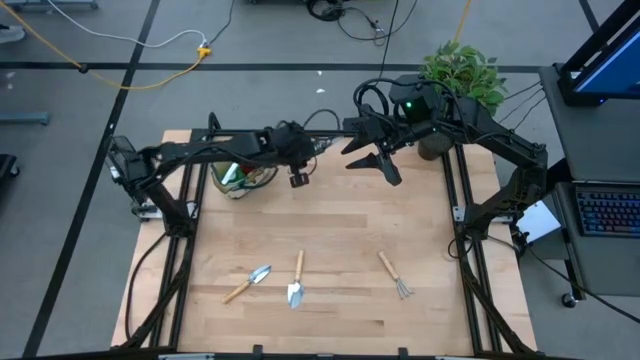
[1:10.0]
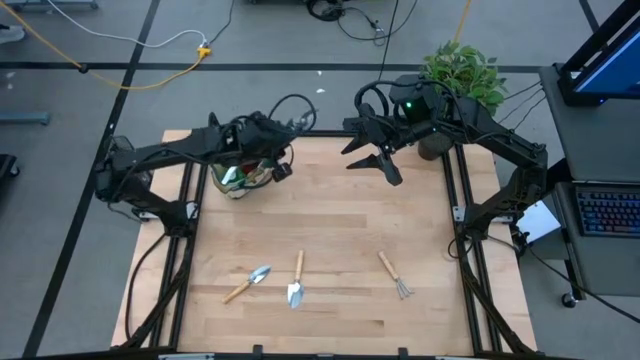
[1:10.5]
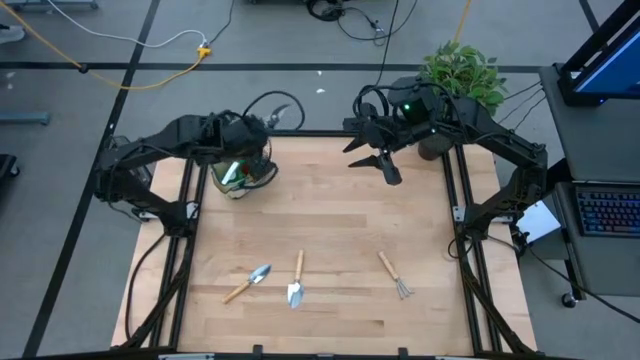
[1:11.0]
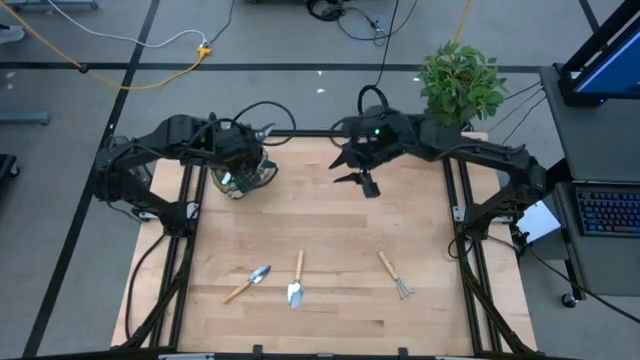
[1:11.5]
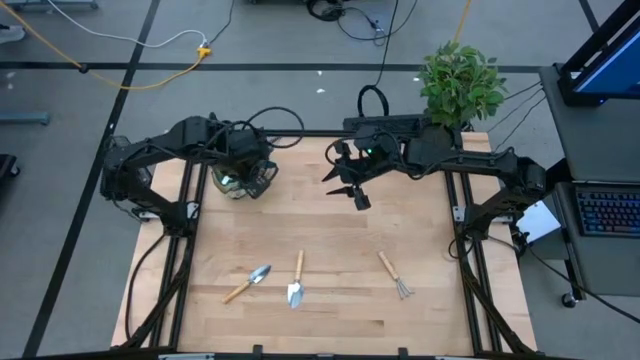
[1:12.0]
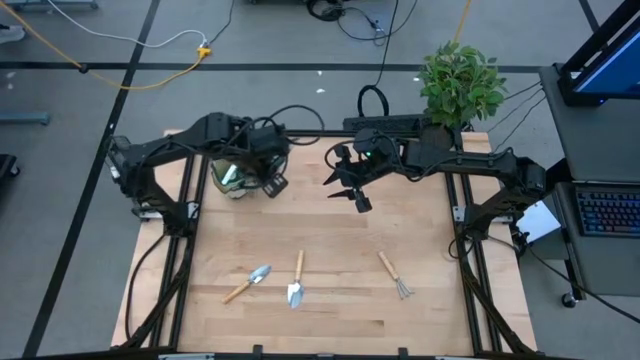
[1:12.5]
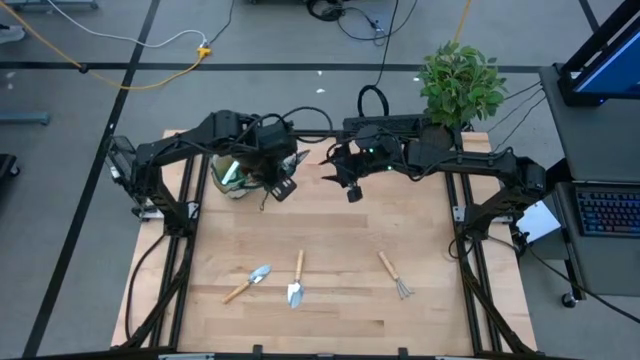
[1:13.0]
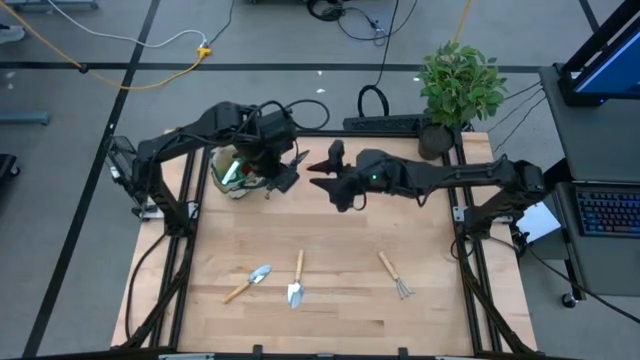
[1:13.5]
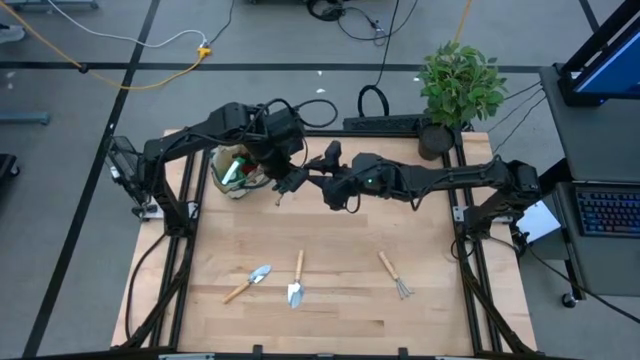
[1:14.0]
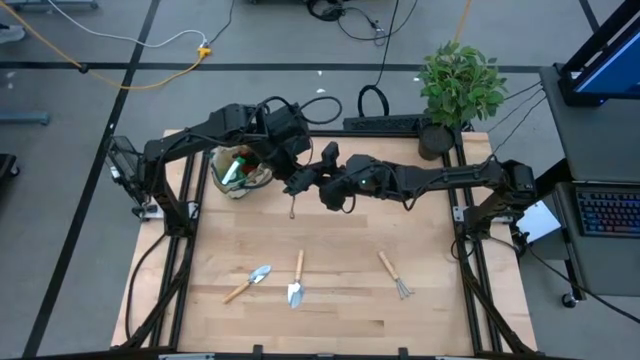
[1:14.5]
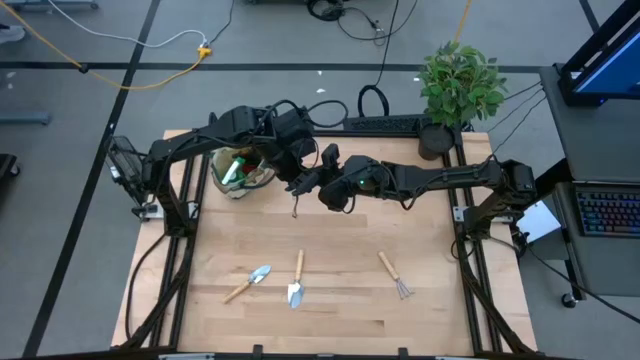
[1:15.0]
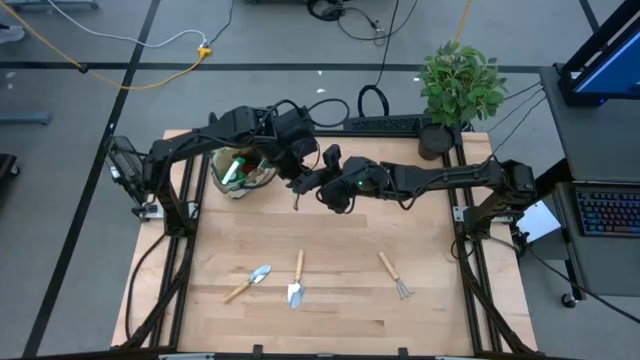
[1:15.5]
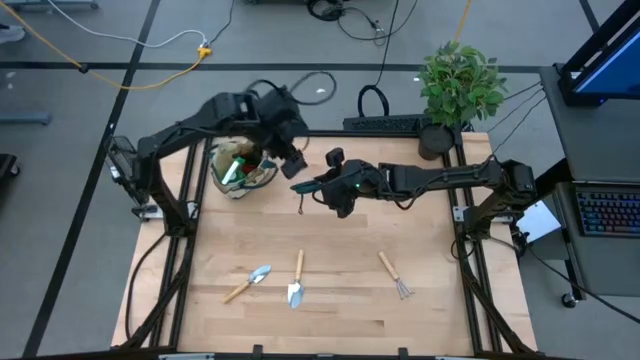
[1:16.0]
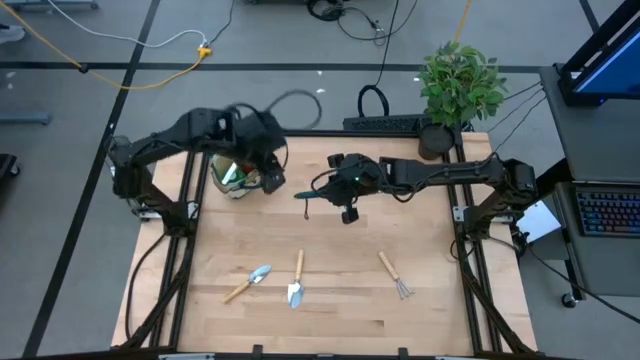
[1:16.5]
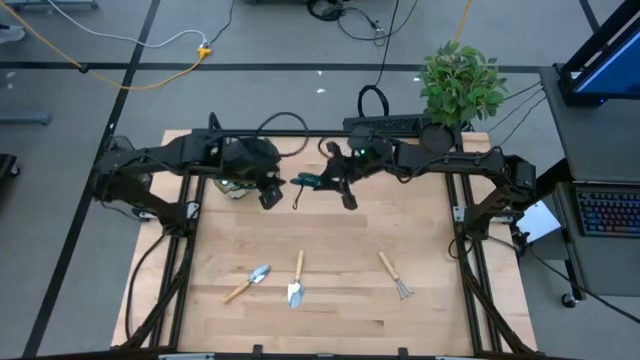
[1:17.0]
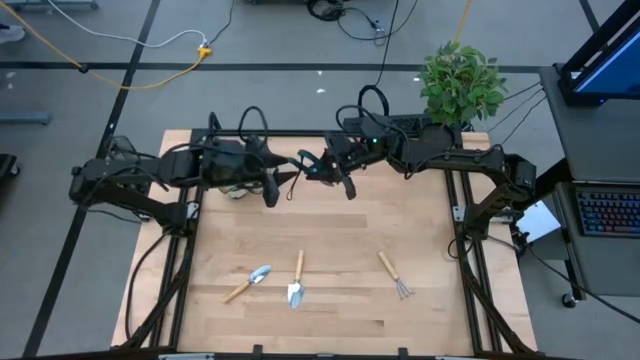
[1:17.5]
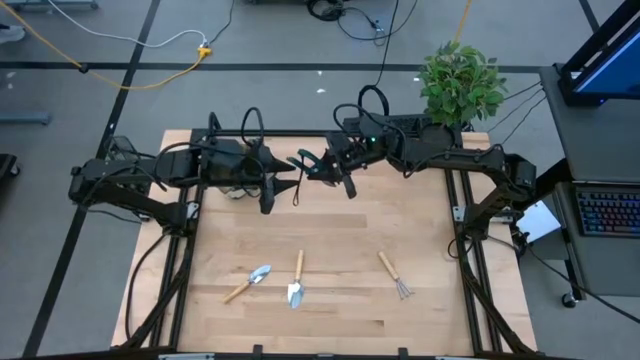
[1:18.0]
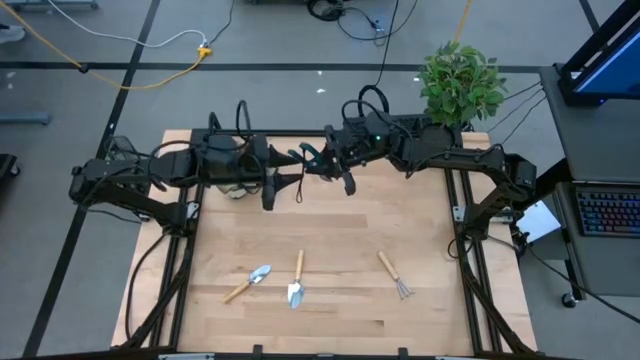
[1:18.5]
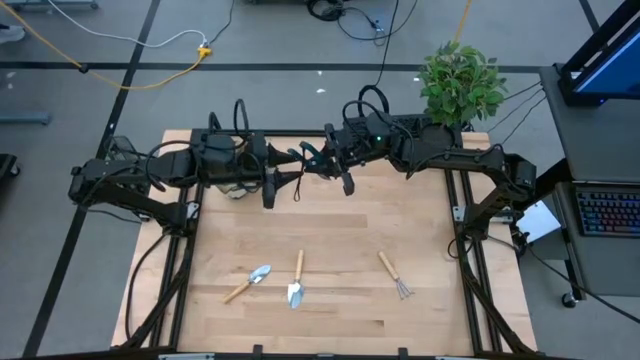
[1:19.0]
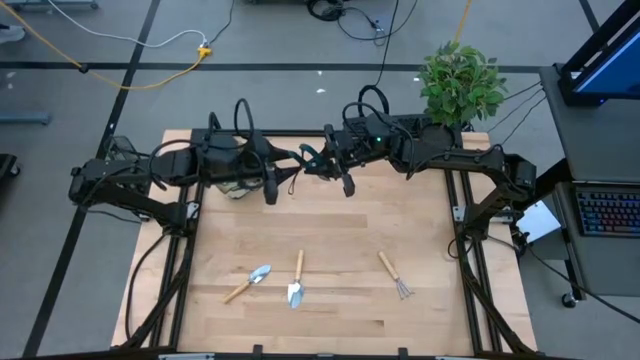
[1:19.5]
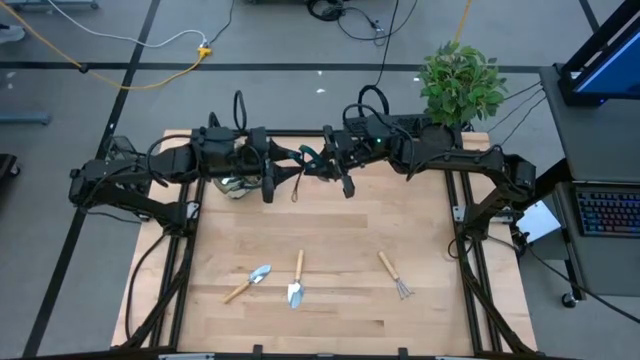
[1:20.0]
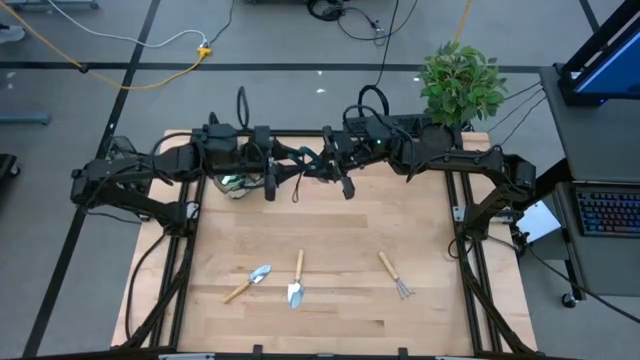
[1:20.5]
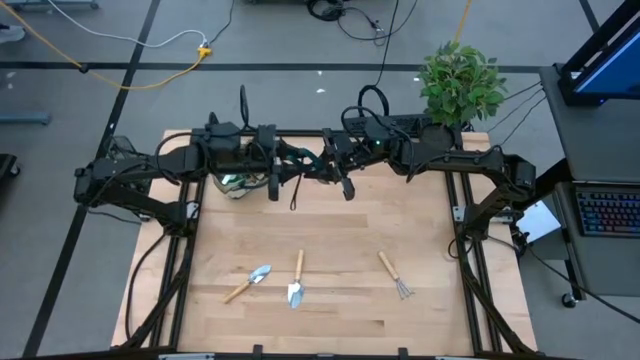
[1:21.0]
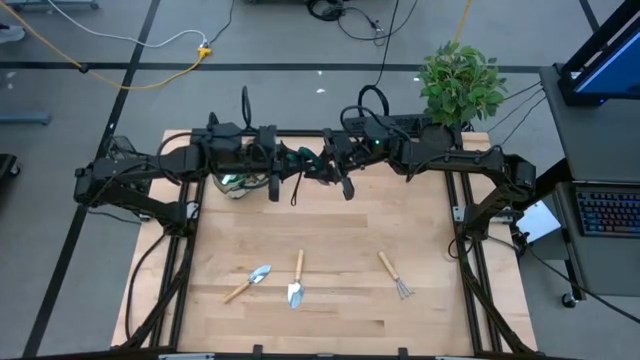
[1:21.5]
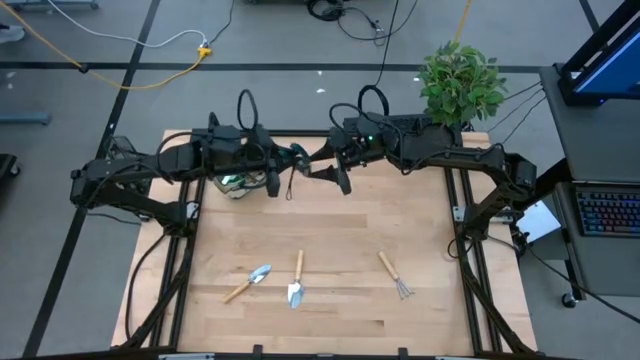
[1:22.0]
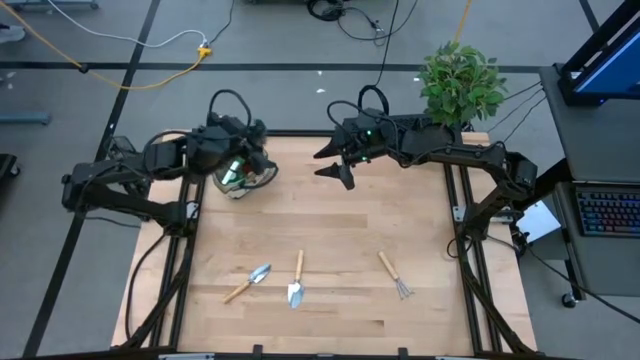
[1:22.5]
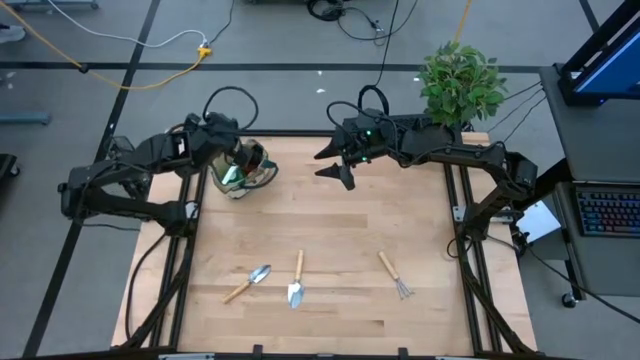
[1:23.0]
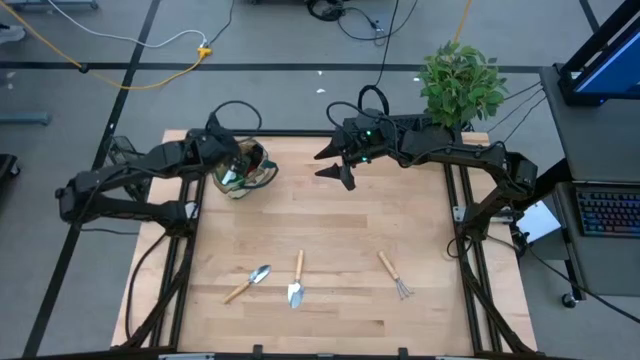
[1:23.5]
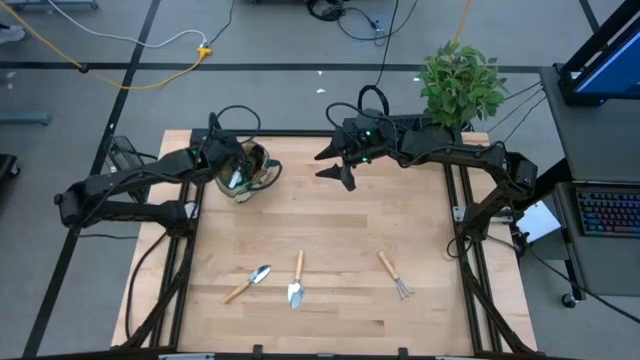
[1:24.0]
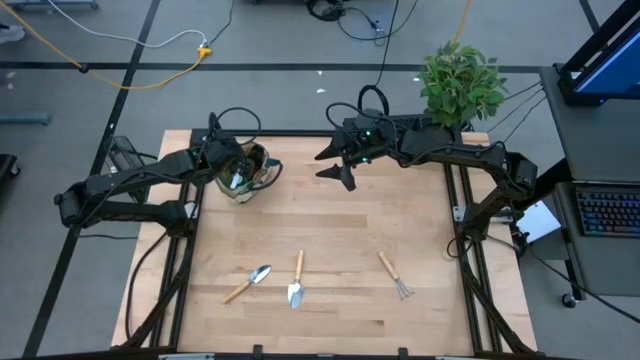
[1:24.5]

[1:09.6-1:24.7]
Task: Pick & Place Garden tools in Gardening bag
Put the shear scissor into the gardening bag

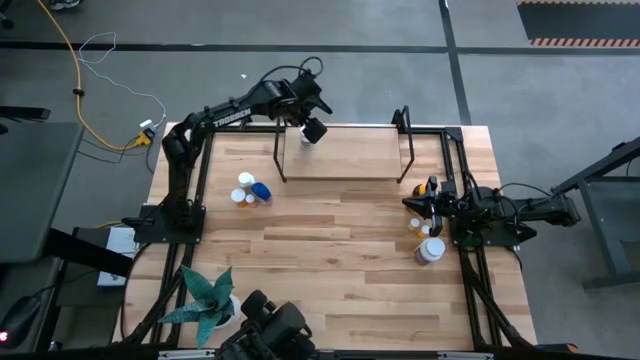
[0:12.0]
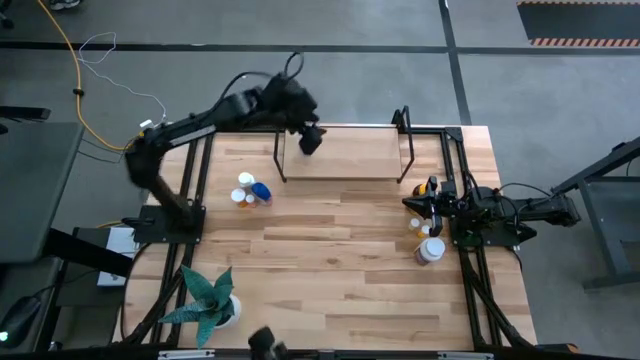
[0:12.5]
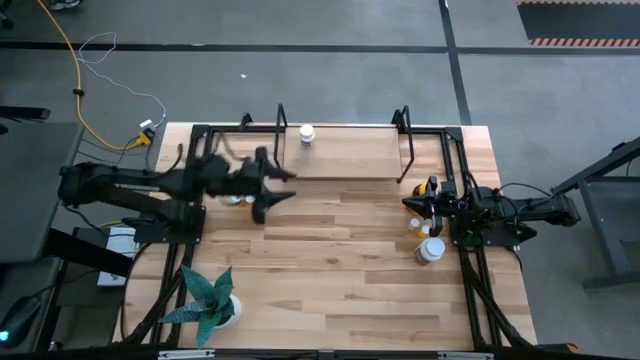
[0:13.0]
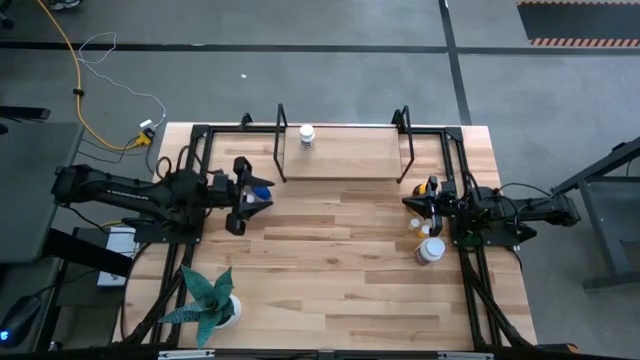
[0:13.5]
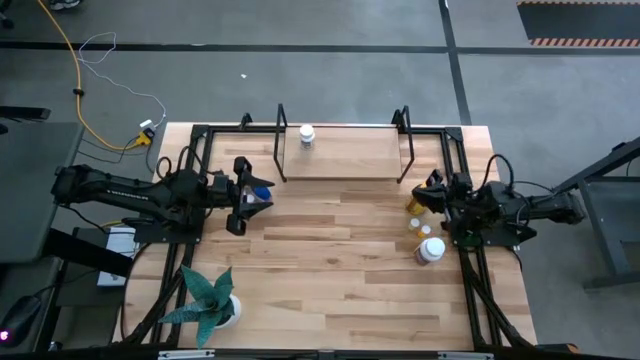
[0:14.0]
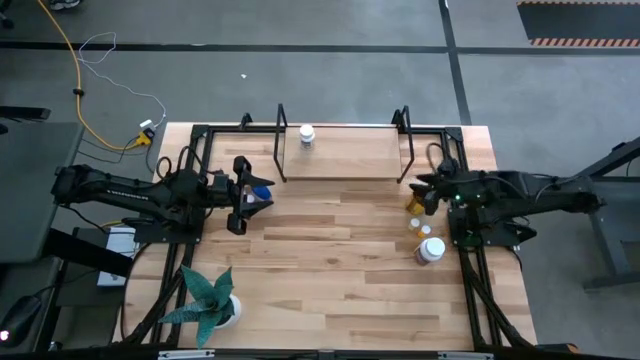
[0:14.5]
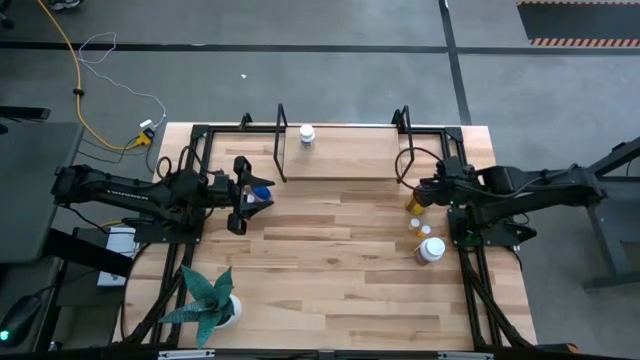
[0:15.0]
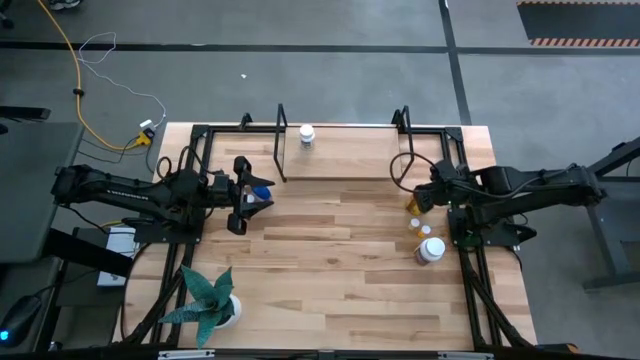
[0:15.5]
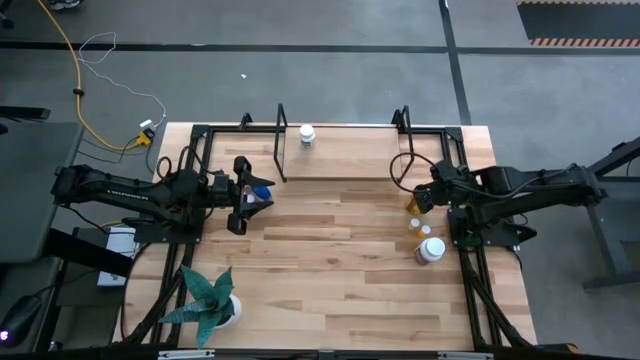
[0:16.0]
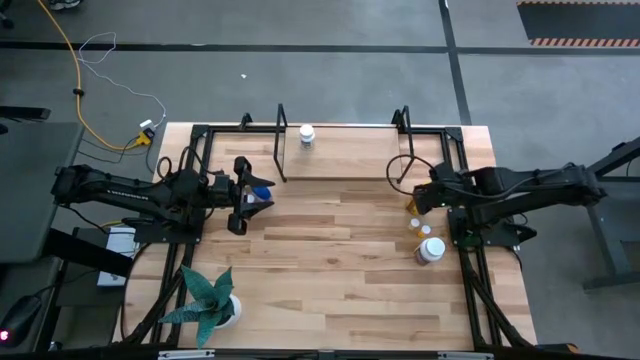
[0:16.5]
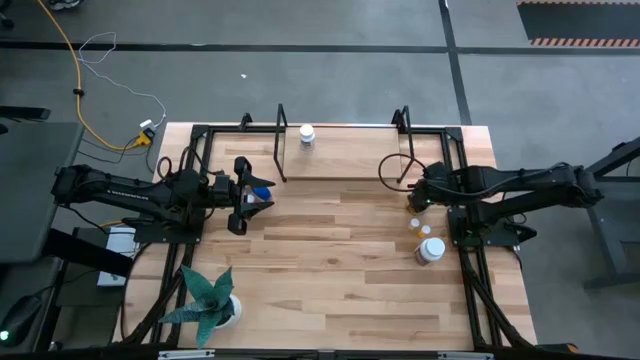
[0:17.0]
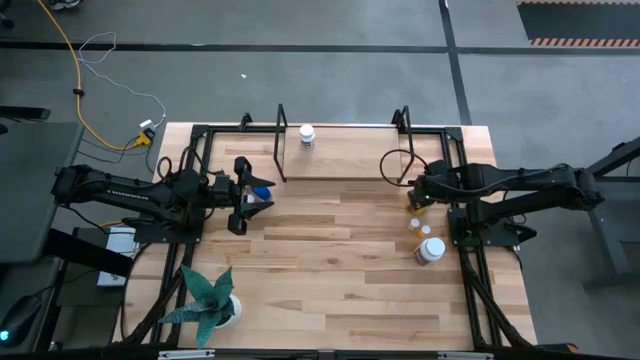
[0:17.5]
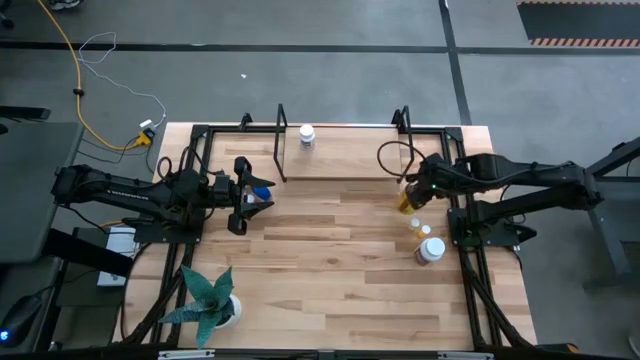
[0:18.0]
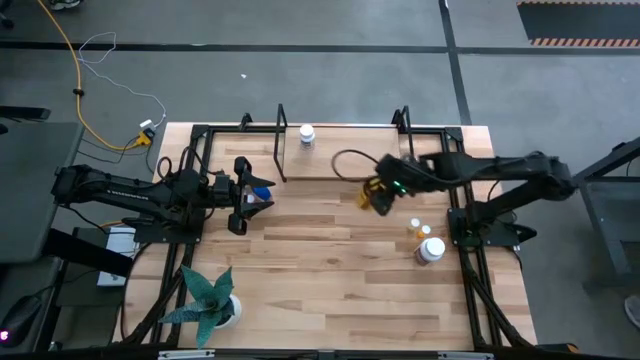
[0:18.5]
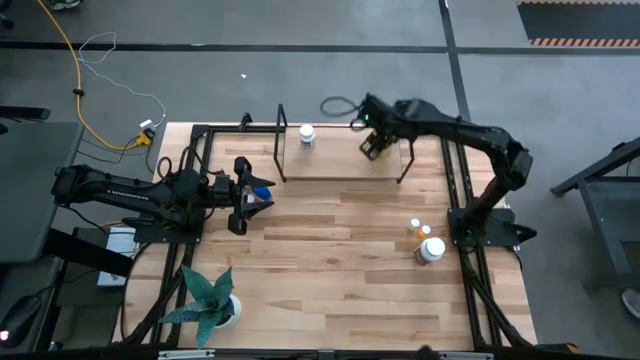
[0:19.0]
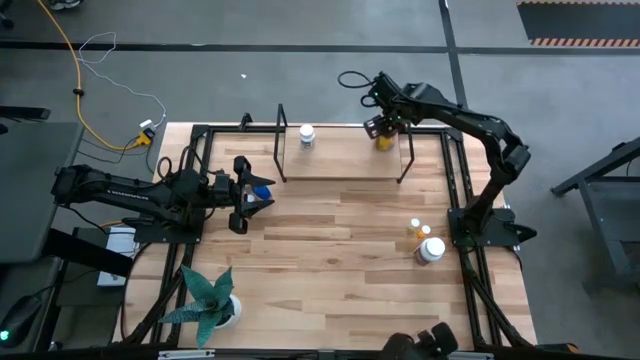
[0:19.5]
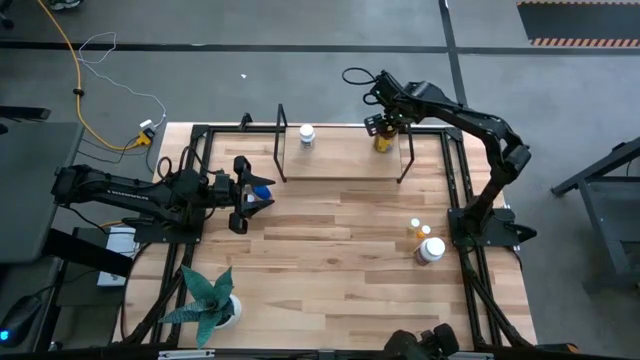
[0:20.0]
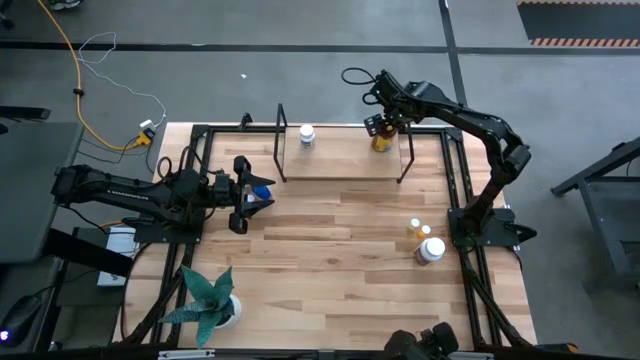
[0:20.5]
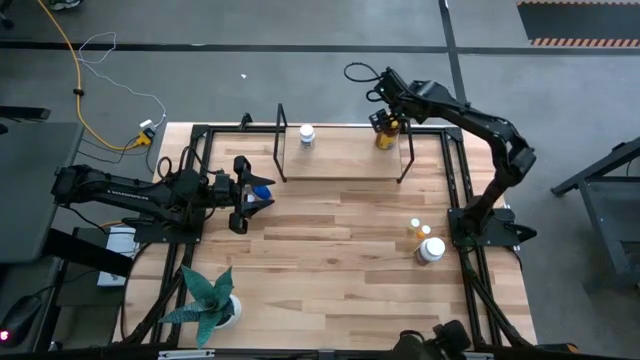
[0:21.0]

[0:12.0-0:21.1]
Task: Pick and place medicine bottles onto shelf by color
Put the large yellow pill bottle on the shelf
